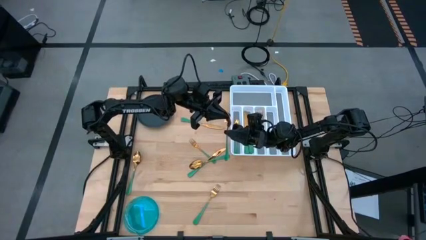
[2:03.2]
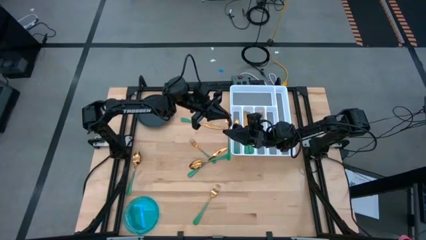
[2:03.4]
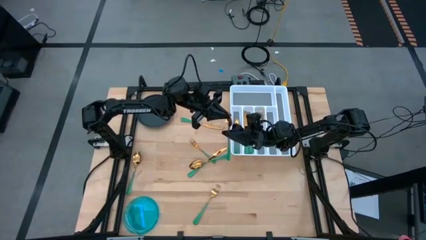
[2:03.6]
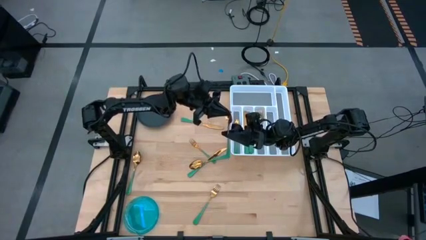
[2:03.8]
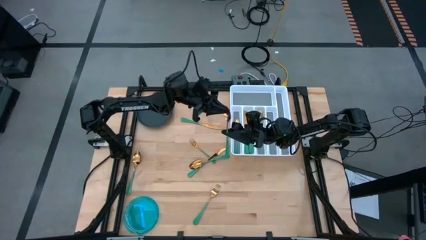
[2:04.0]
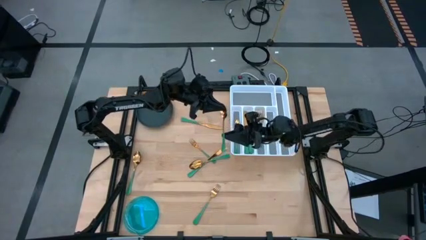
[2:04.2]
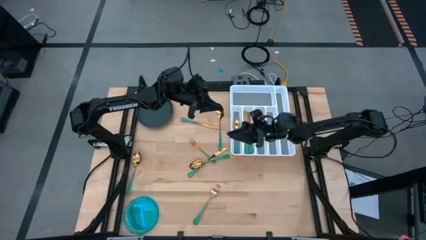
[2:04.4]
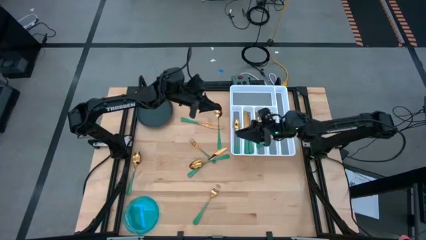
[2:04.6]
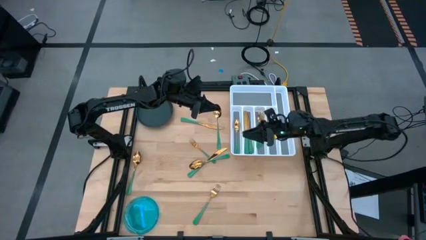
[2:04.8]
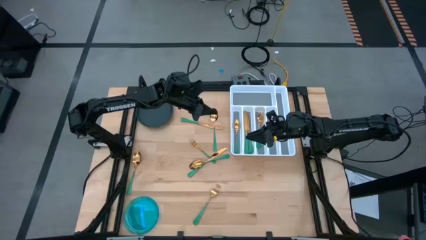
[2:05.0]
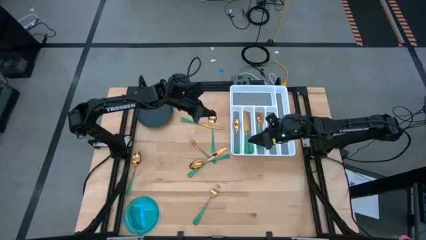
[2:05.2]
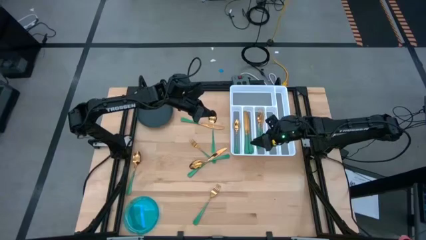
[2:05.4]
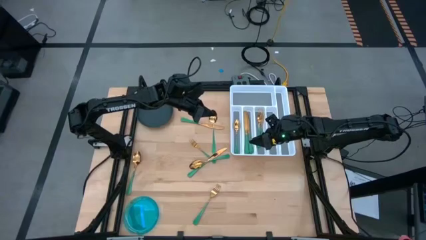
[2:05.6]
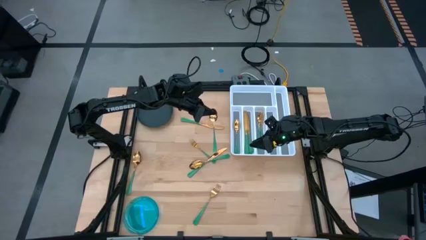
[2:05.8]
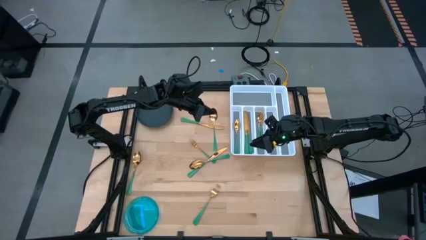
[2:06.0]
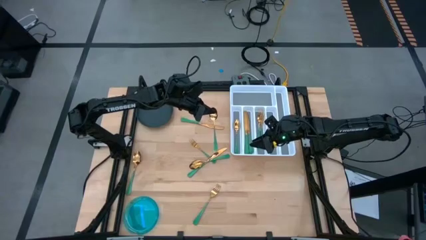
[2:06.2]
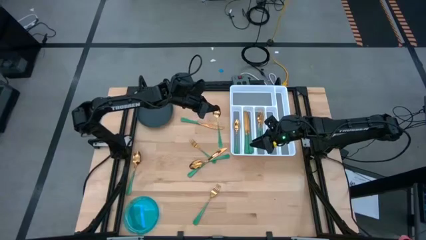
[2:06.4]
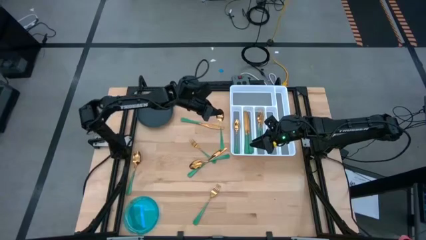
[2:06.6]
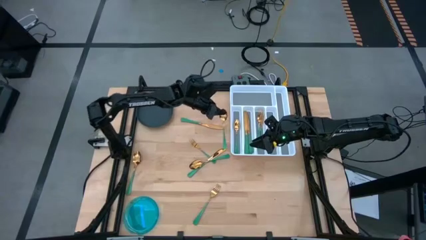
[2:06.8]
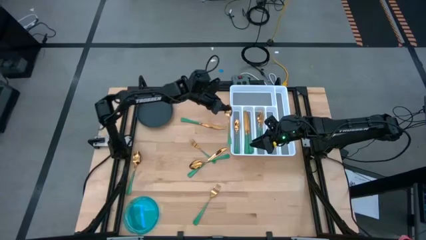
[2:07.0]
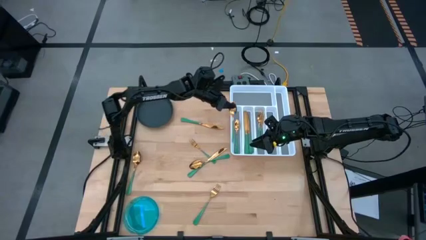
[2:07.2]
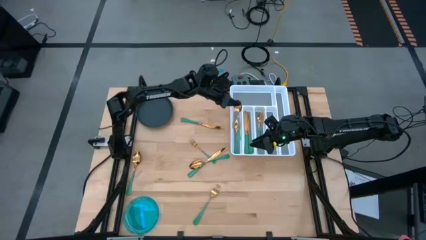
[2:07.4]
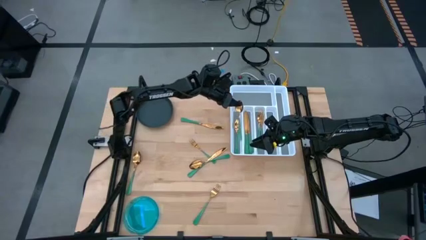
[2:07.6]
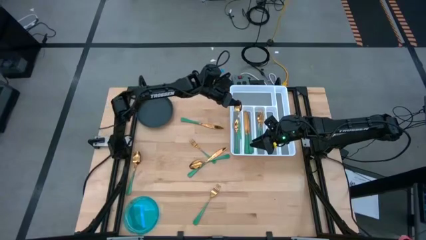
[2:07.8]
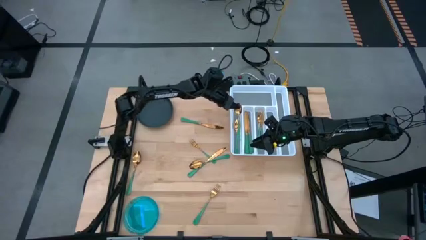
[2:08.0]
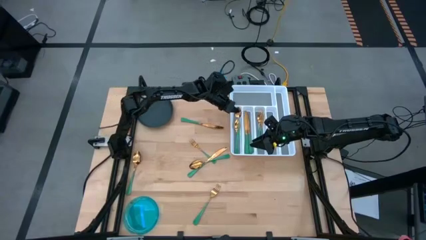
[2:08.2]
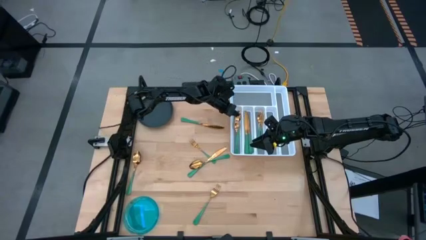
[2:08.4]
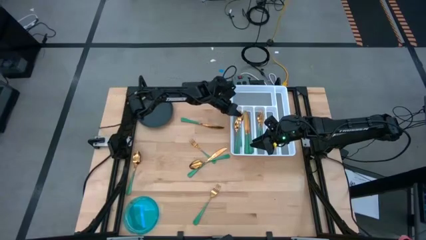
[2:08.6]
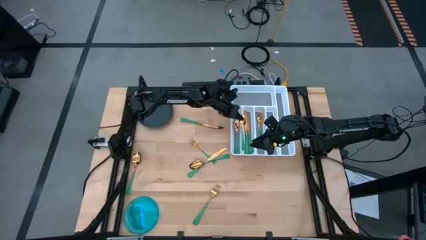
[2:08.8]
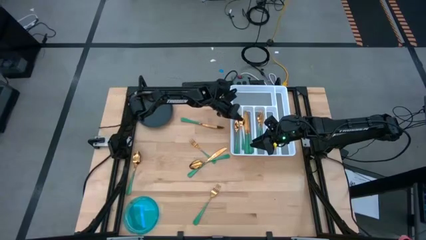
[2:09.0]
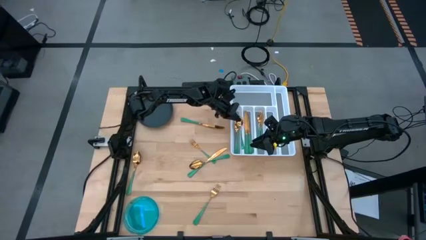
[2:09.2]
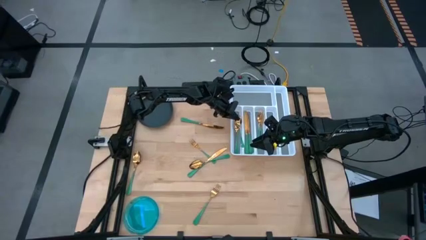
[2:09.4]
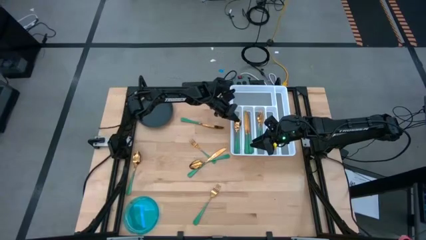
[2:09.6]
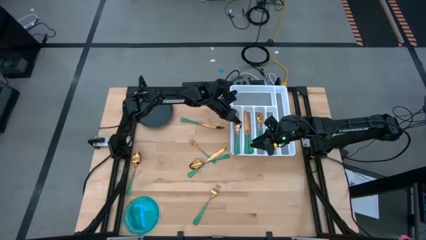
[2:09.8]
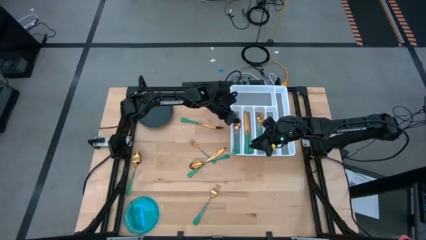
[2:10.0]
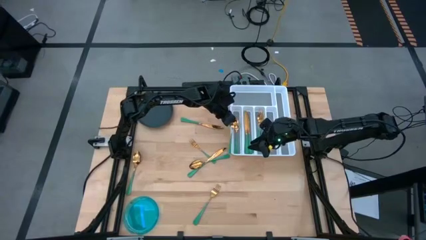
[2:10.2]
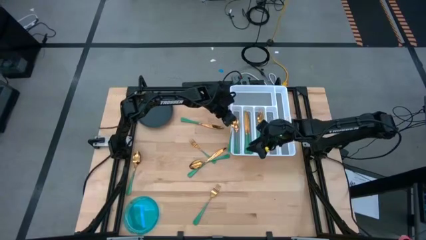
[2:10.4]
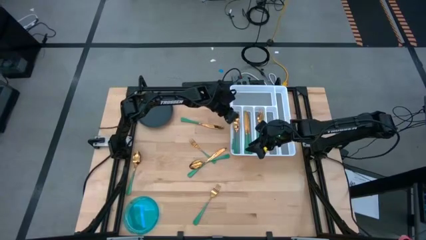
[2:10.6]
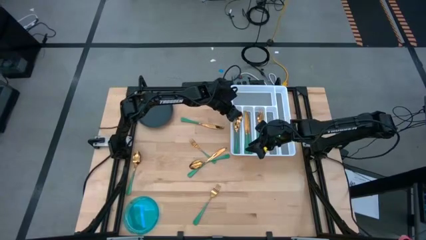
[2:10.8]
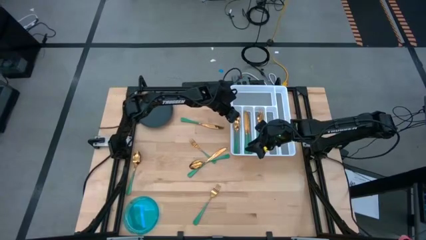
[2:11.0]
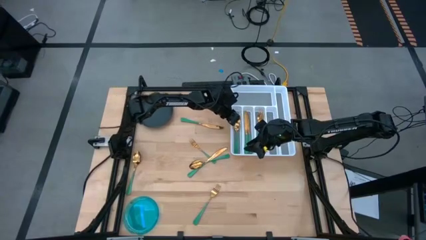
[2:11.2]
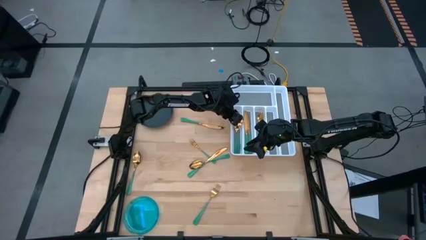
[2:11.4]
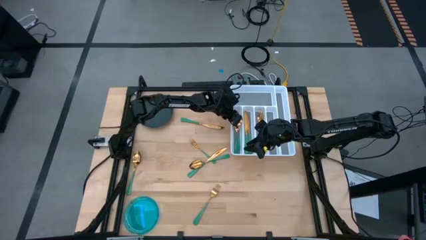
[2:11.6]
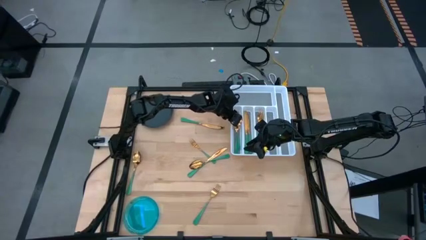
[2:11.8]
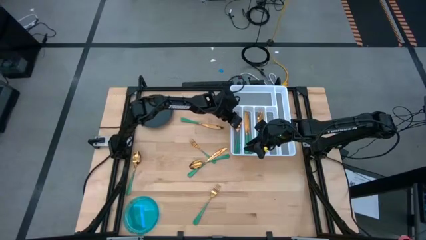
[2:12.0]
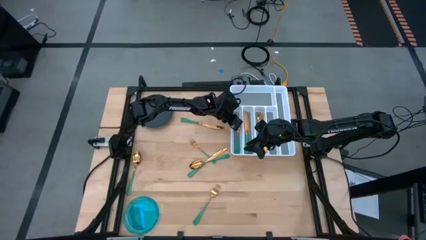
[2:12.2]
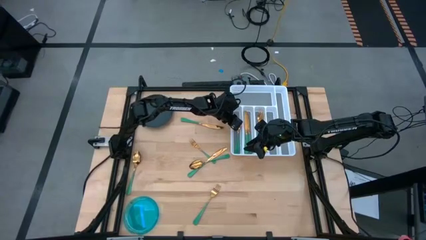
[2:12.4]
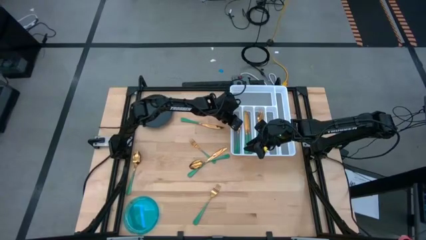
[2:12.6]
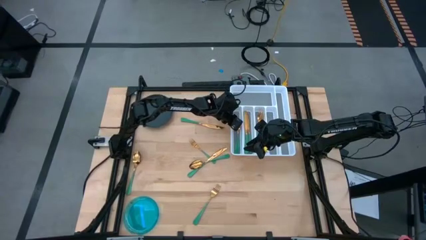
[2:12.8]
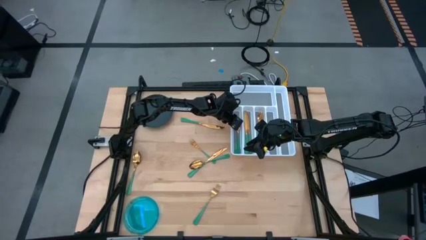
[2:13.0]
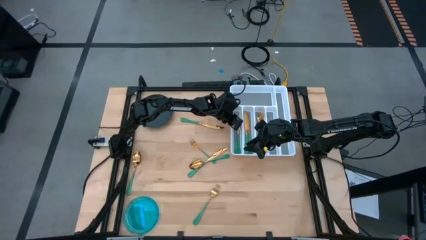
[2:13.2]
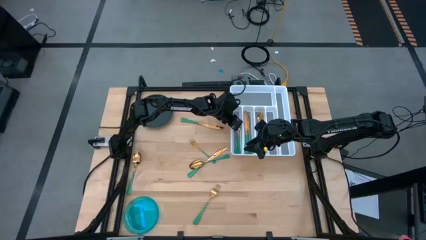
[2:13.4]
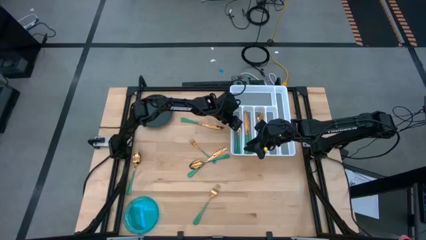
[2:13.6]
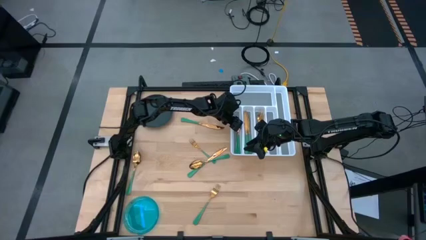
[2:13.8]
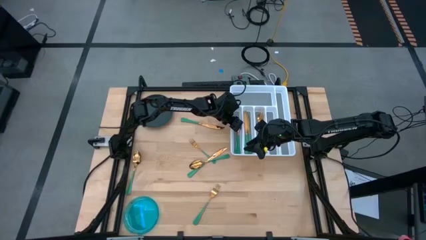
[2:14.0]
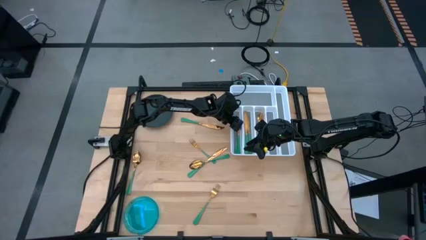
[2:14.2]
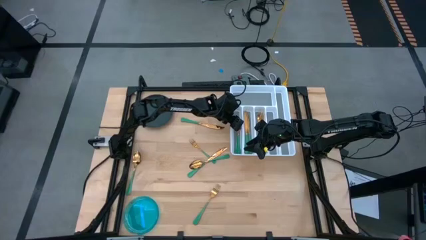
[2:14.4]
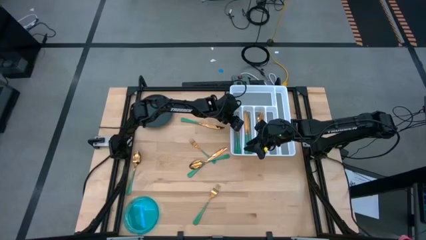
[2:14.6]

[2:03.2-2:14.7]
Task: Sort silverware
Put the green spoon on the silverware organizer

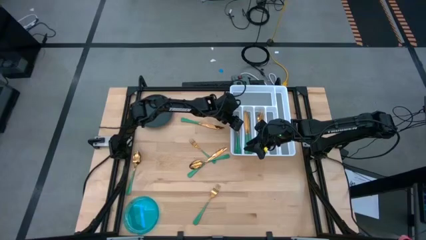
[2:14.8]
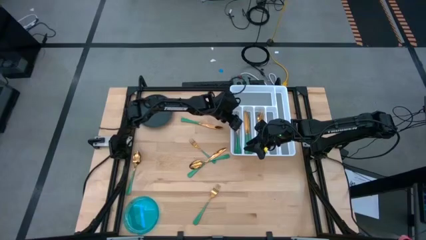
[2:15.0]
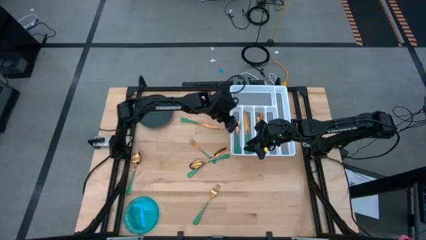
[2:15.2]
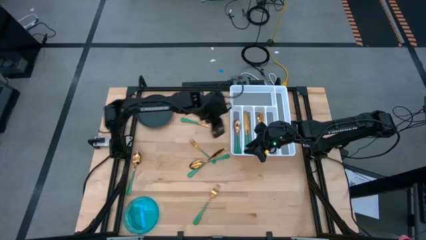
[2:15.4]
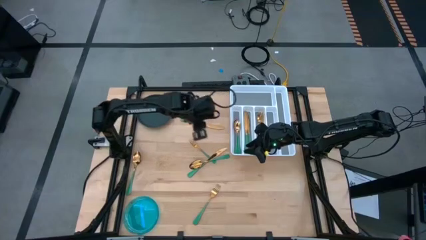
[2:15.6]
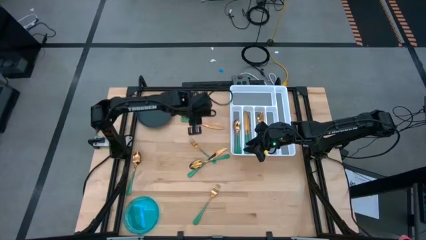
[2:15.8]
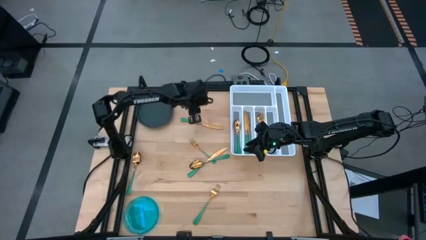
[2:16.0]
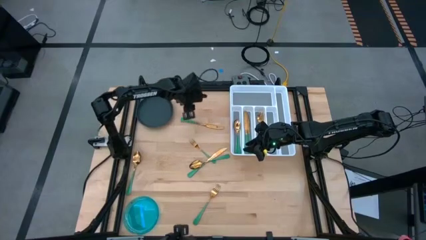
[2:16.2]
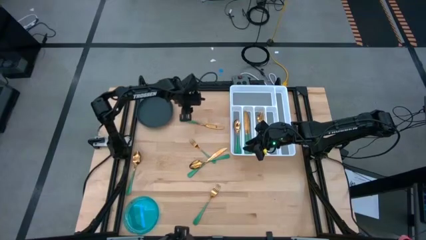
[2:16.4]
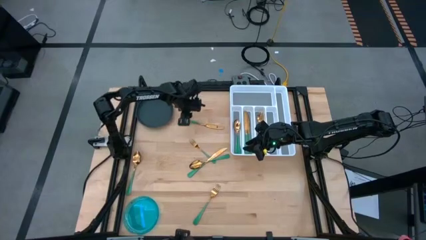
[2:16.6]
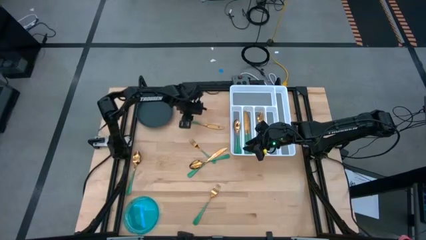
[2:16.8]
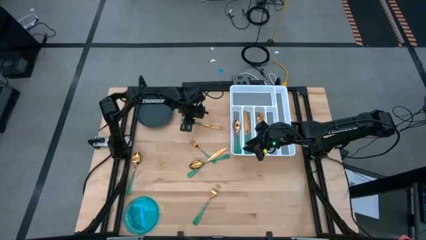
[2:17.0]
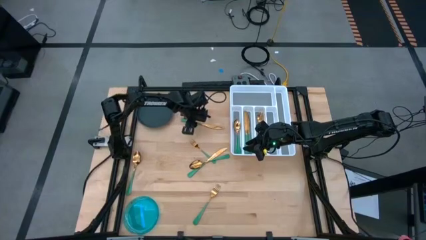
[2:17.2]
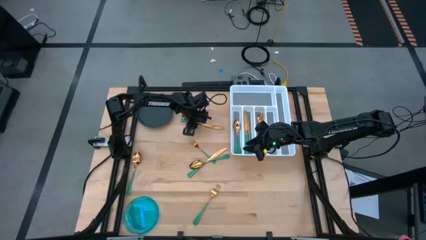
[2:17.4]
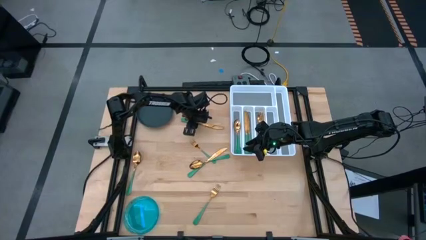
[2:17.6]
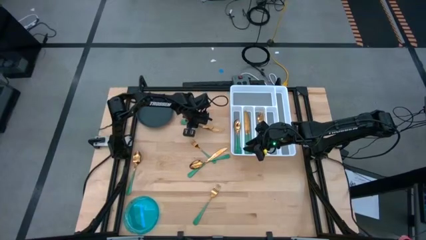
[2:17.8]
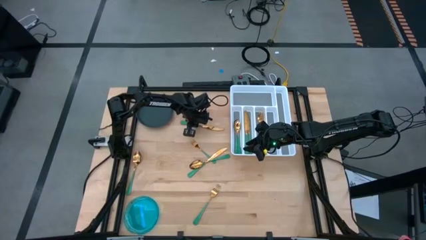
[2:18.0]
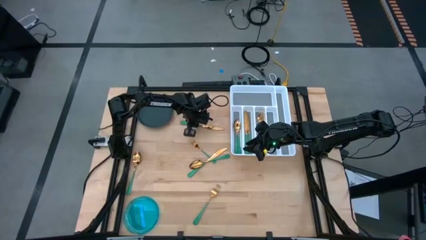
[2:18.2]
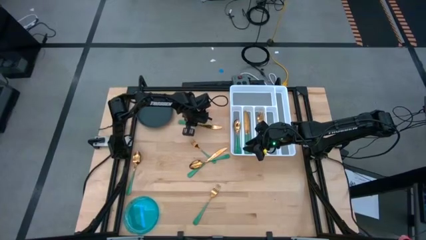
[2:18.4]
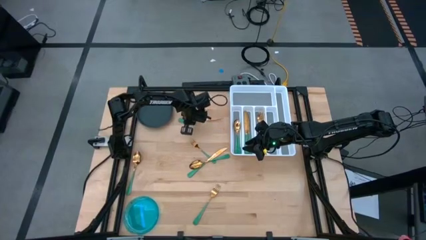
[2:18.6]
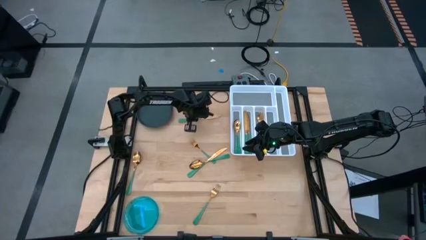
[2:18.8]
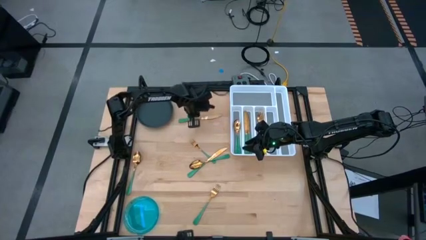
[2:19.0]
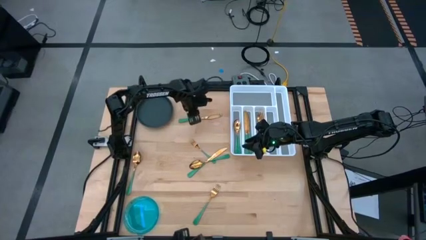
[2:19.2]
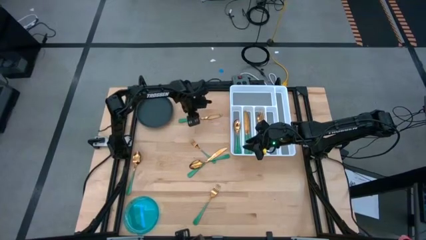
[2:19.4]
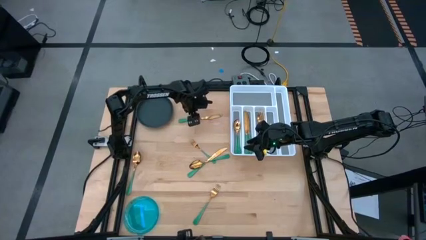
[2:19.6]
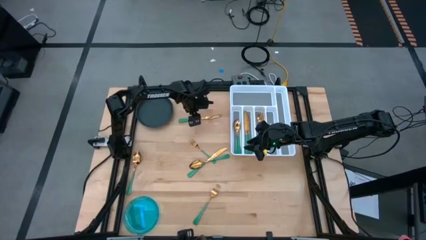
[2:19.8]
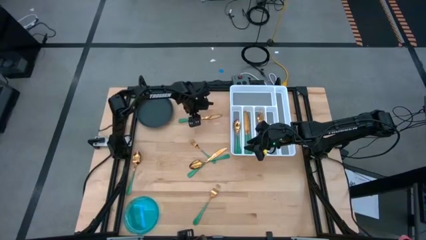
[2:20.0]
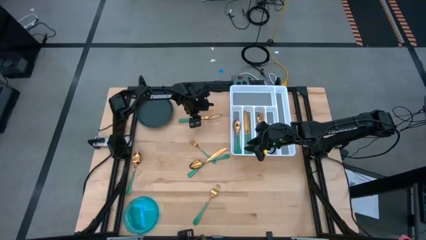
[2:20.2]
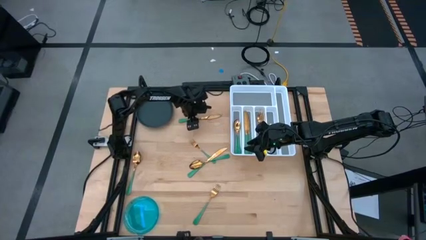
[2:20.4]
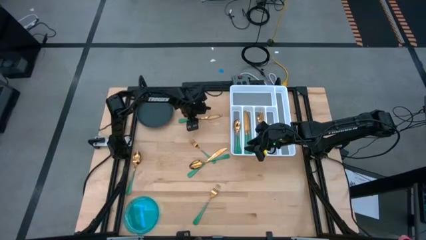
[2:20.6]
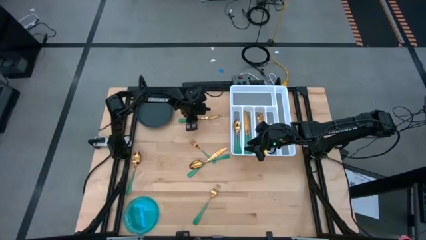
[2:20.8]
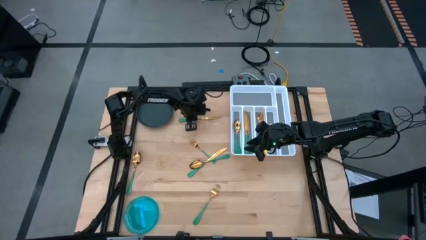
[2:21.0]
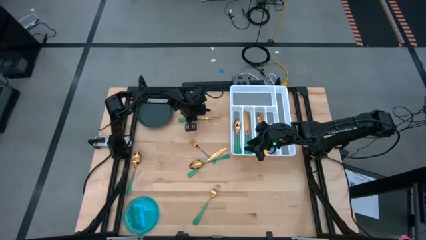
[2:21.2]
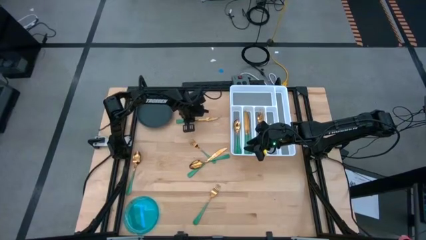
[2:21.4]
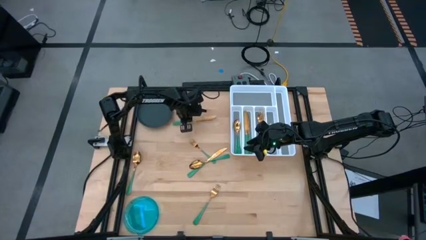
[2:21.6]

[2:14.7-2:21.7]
Put the green knife on the silverware organizer
